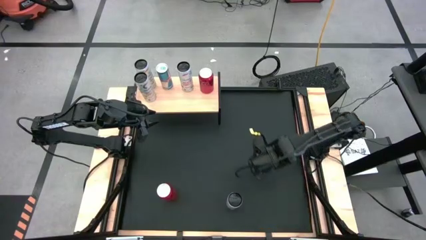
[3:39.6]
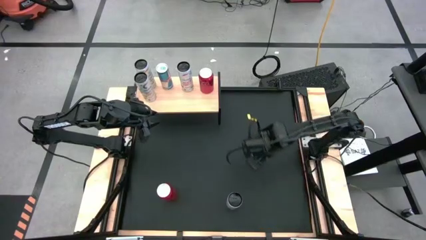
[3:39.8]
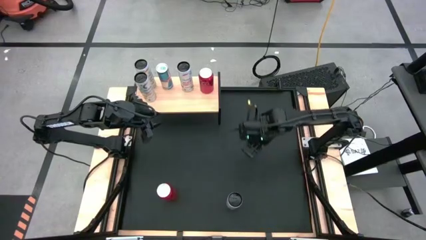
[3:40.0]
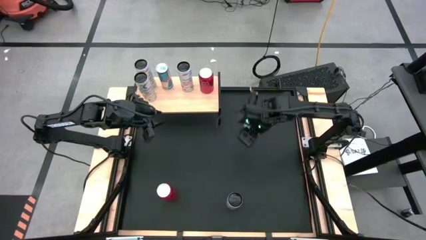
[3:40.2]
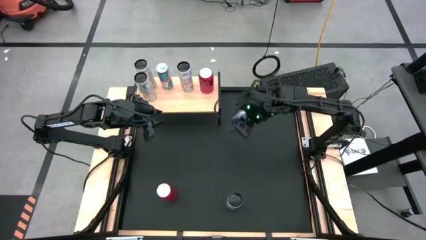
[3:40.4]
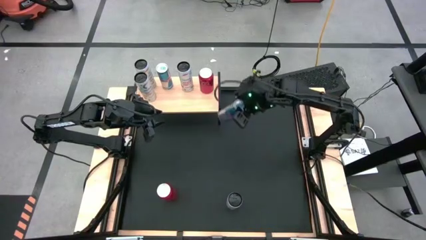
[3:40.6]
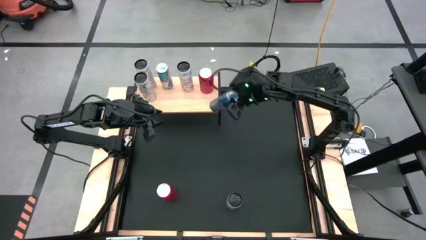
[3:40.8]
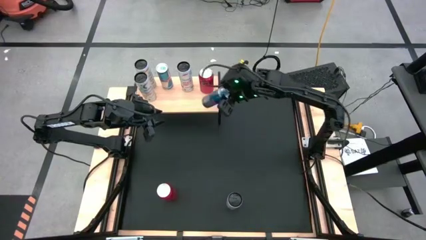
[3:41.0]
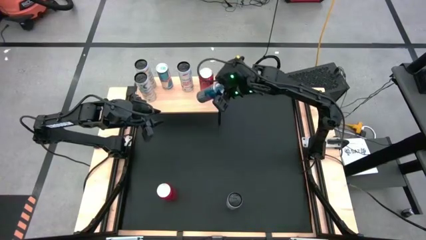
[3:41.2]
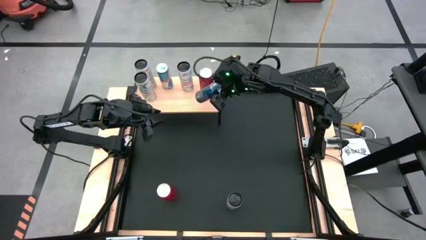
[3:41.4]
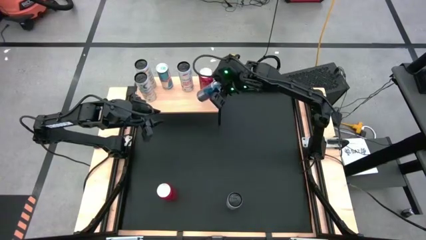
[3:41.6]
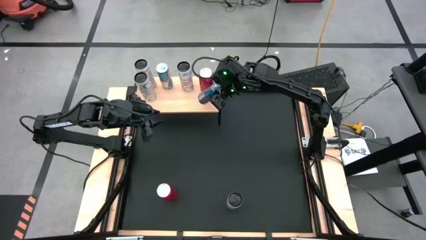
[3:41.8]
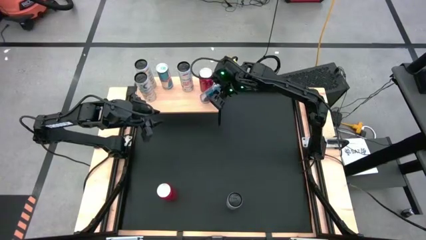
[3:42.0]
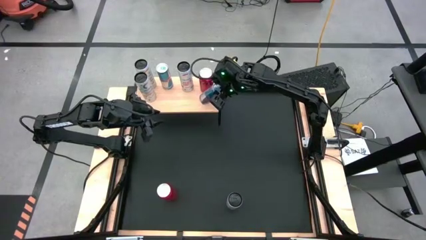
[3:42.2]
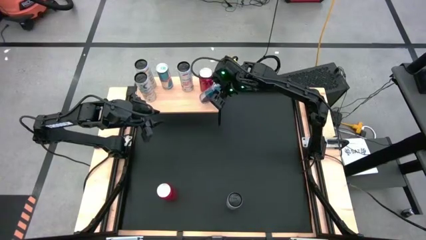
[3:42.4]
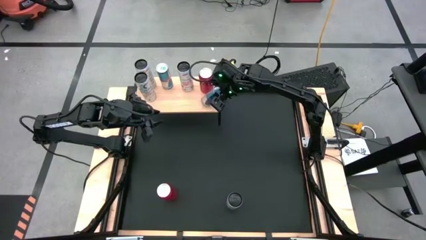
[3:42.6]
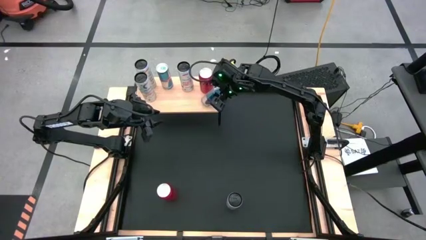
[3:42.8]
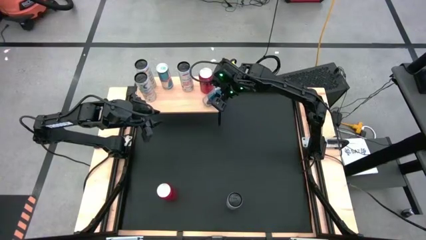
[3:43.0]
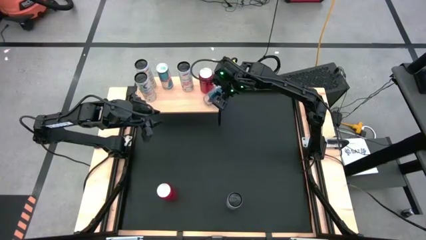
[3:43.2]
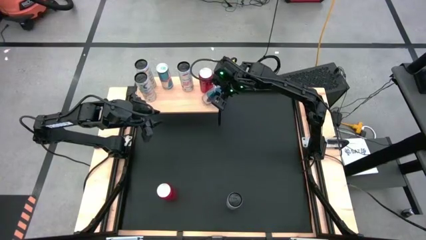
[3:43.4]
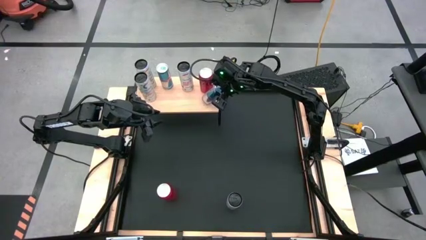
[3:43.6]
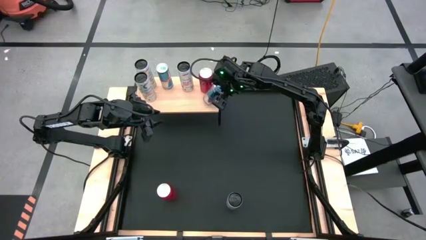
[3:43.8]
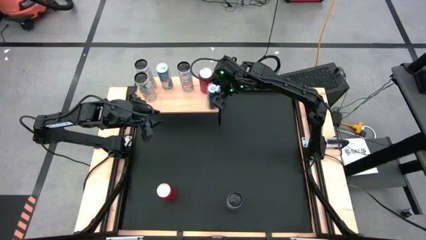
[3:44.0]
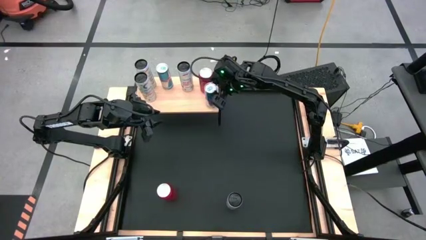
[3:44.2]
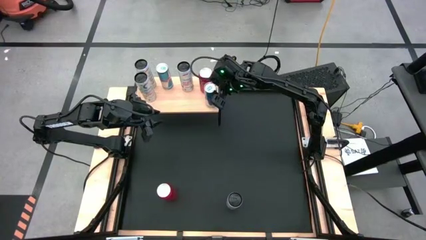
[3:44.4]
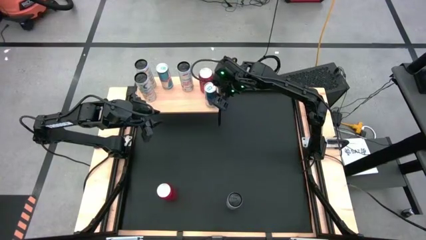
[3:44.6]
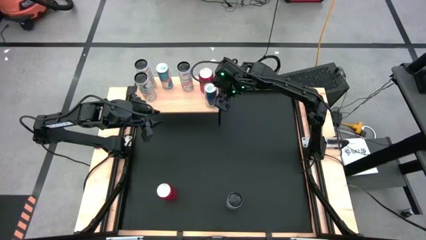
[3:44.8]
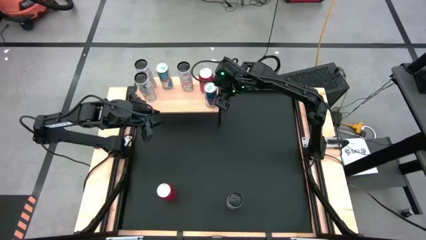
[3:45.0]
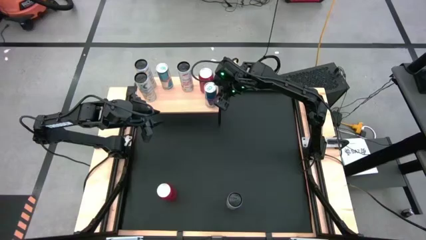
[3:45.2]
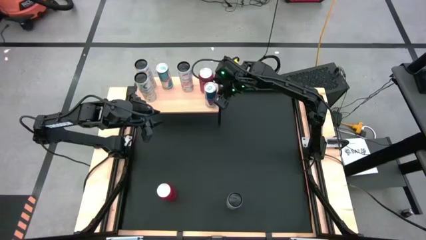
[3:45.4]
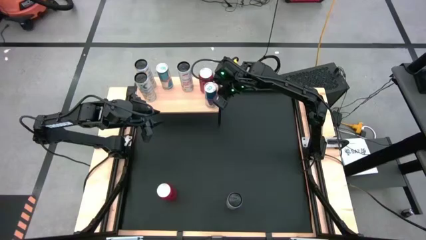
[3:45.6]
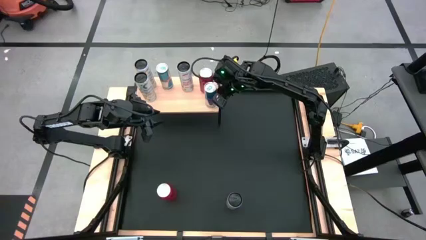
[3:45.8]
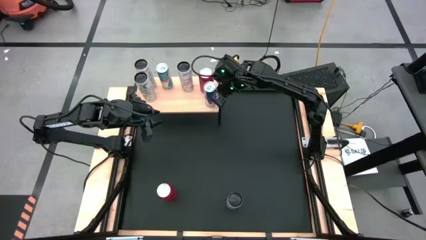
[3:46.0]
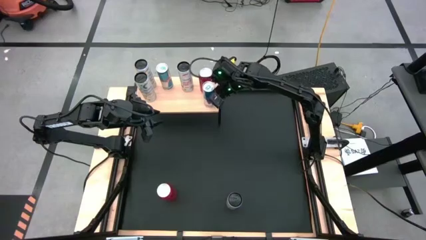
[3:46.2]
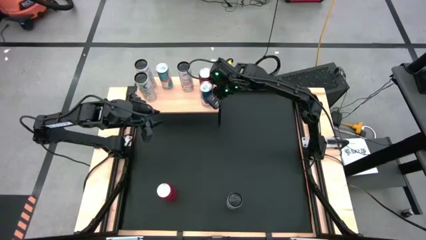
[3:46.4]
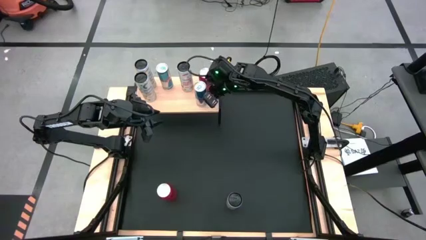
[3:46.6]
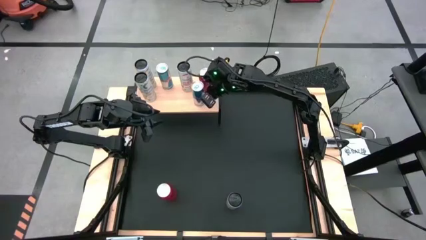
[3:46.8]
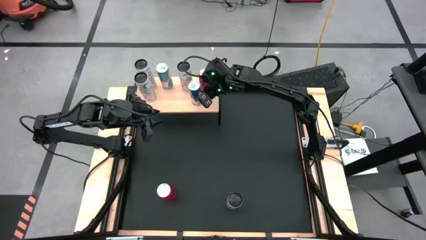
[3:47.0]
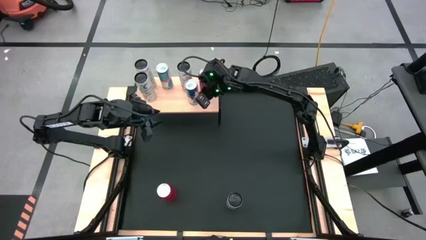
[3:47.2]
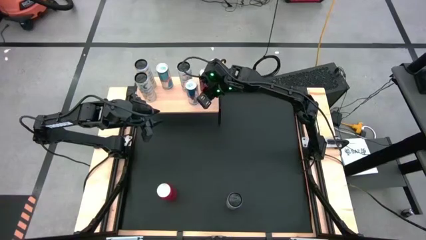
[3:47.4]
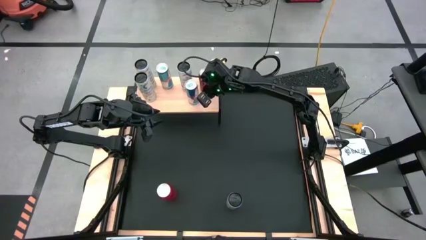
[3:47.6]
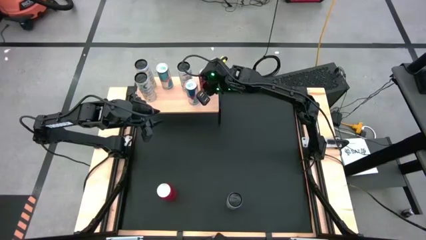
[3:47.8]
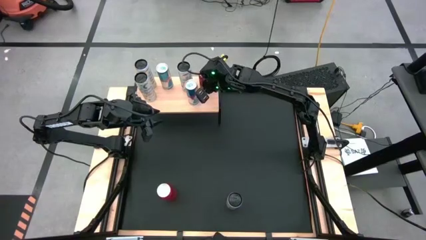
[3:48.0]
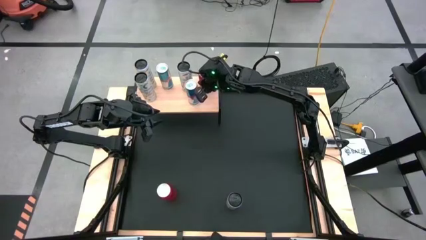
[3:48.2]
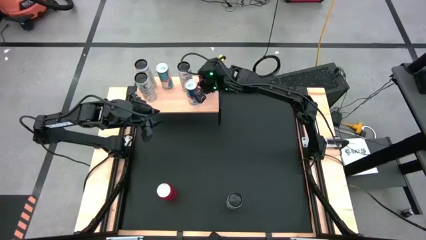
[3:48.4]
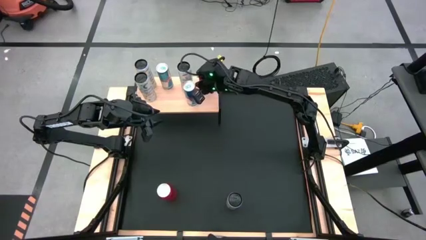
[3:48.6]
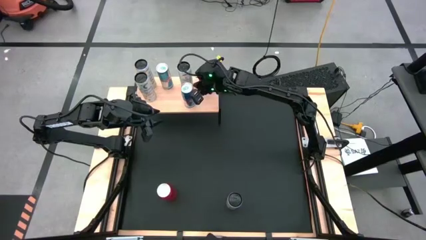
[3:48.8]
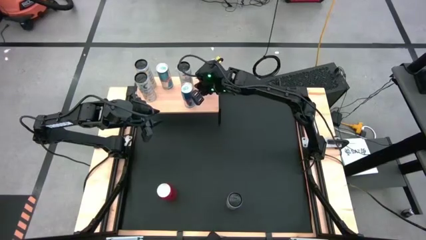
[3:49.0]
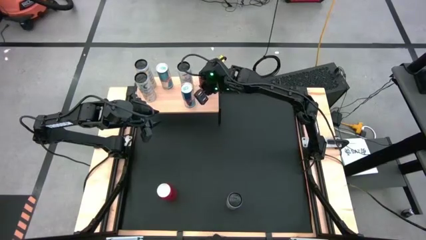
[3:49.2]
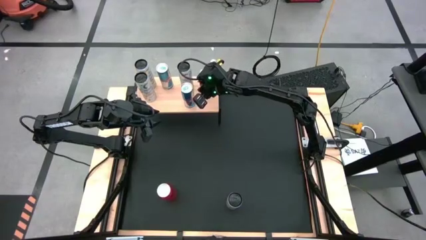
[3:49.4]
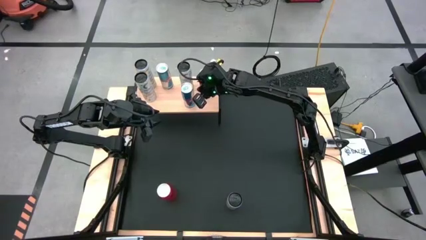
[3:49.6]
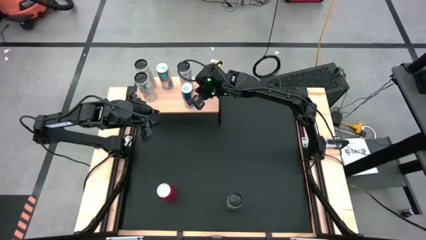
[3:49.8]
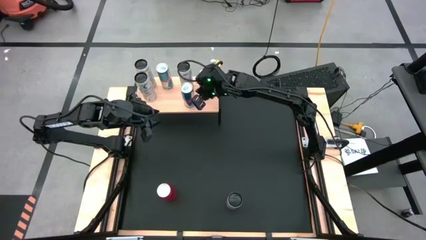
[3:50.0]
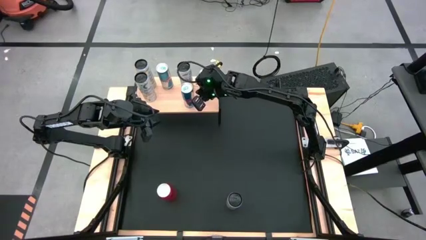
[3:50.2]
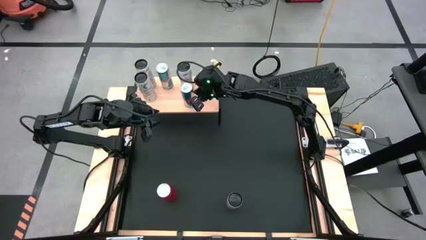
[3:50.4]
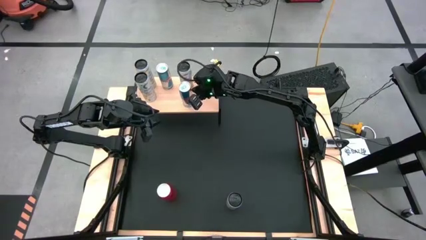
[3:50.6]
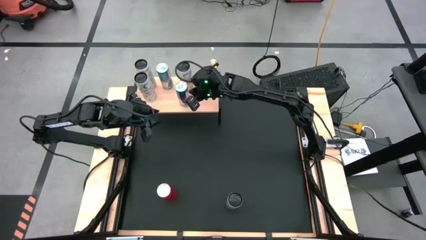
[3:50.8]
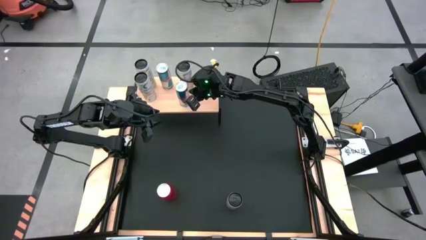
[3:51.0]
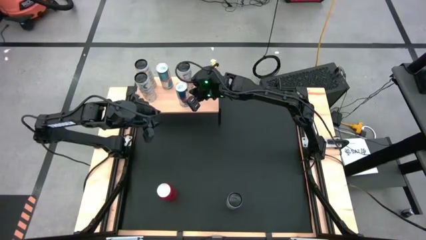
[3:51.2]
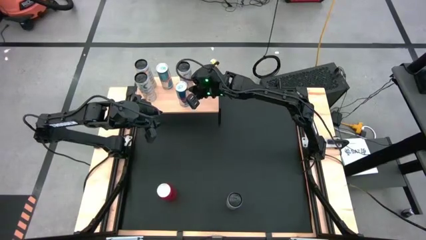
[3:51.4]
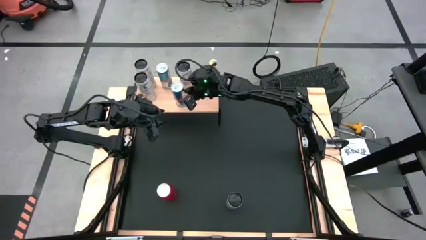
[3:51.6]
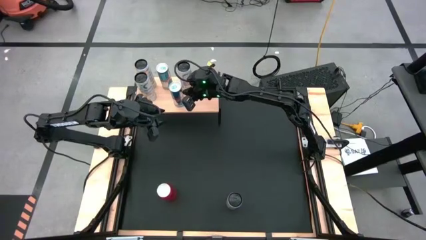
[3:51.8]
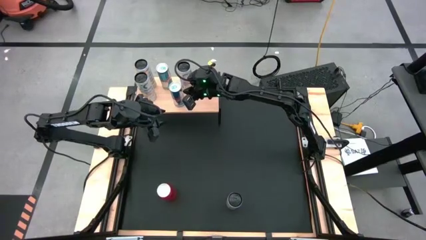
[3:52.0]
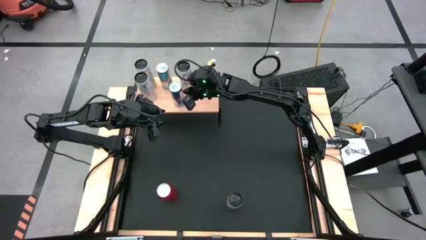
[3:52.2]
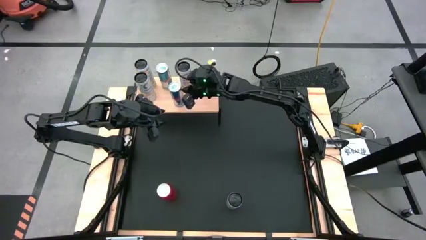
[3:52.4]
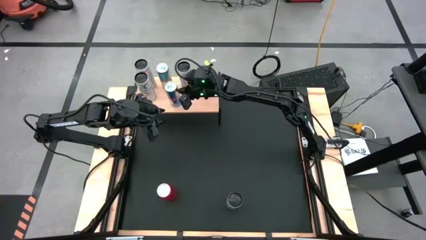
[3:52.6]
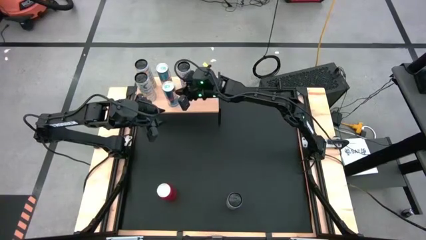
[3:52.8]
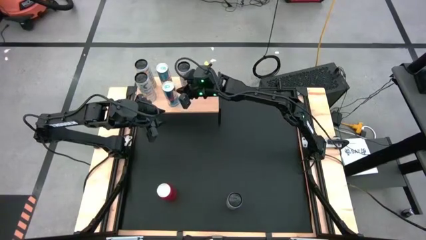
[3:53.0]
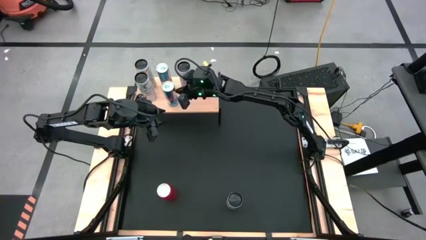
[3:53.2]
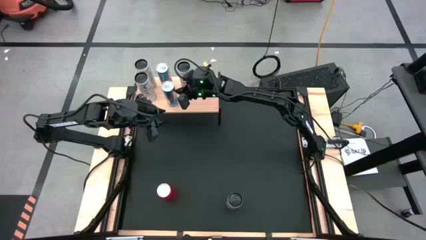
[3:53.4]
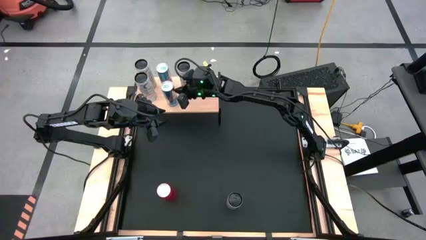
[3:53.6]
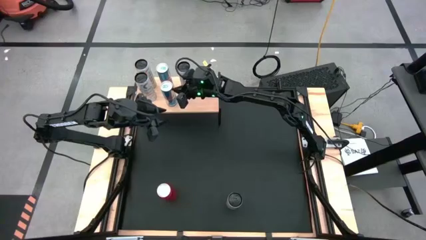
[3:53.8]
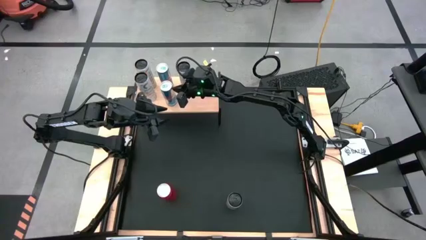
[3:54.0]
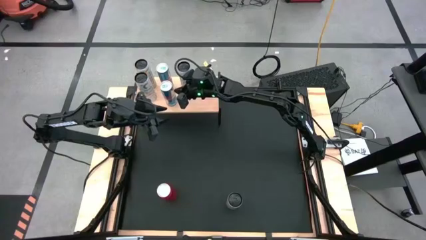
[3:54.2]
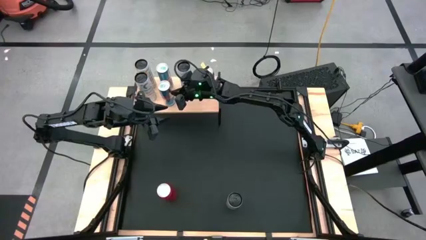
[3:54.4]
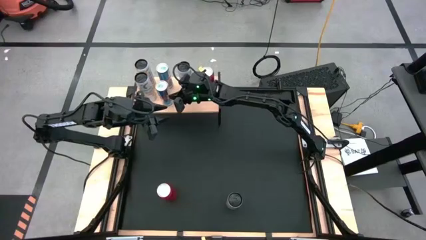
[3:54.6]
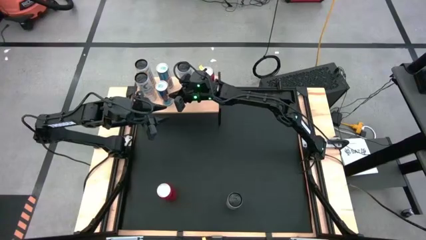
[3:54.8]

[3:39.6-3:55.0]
Task: Place canned beverage on shelf
Put the blue soda can on the shelf aligned with the blue soda can

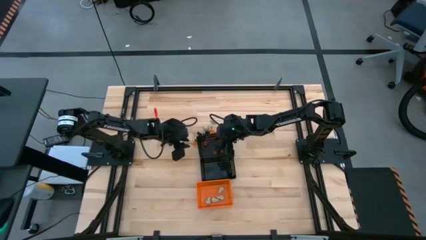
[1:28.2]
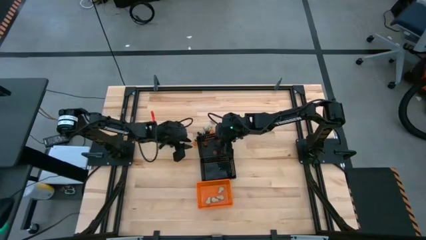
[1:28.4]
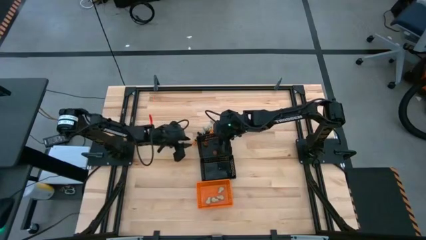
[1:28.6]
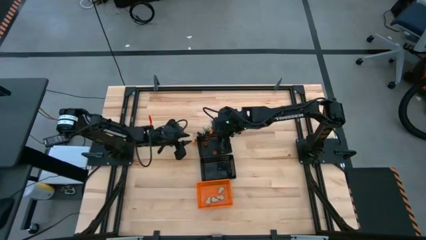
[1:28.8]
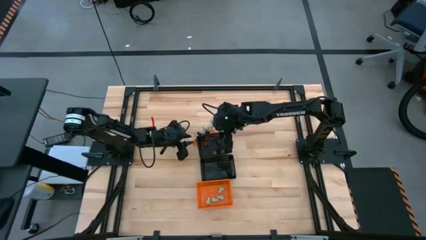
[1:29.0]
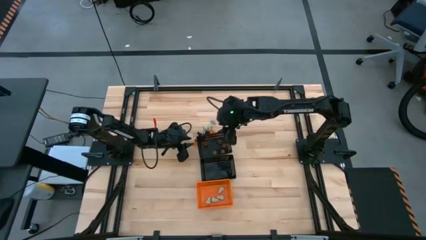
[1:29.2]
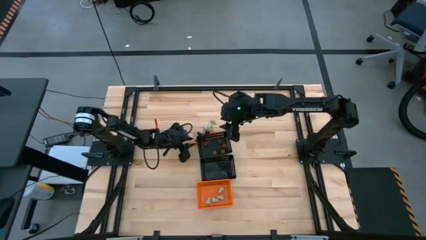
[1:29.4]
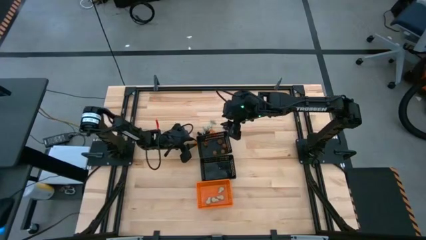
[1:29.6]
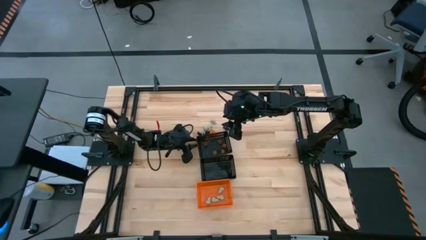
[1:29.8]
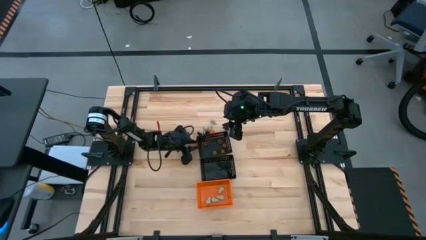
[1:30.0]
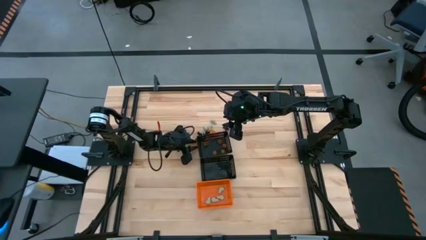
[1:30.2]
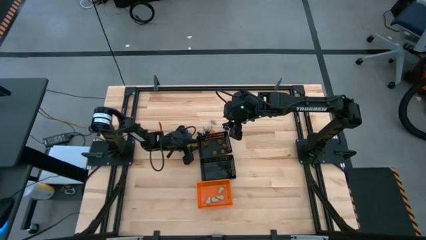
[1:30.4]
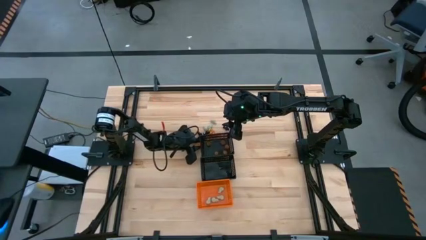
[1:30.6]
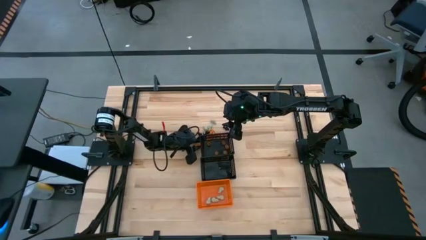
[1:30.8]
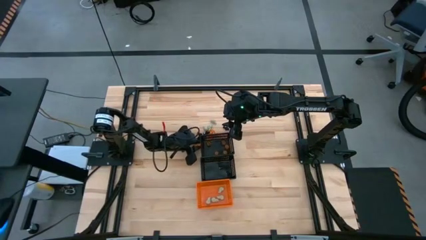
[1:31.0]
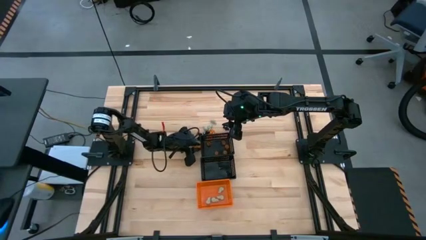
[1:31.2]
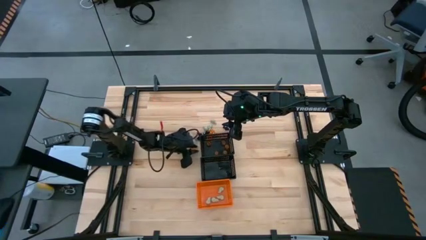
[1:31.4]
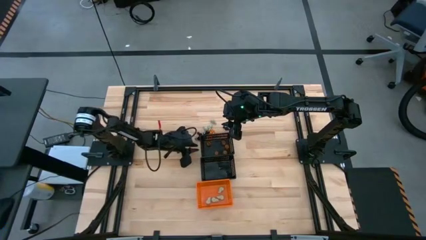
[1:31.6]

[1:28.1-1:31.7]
Task: Sort Halloween decoration
Put the orange pumpkin toy into the top black bin
